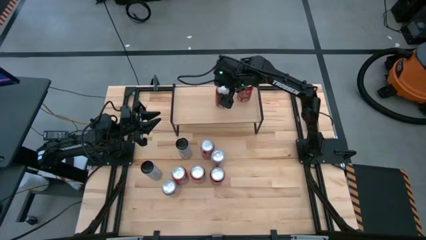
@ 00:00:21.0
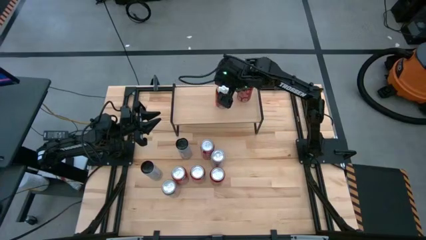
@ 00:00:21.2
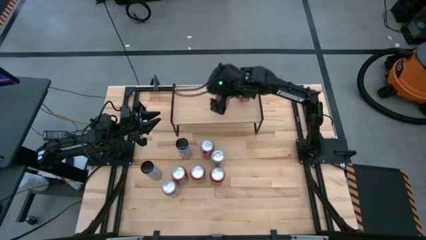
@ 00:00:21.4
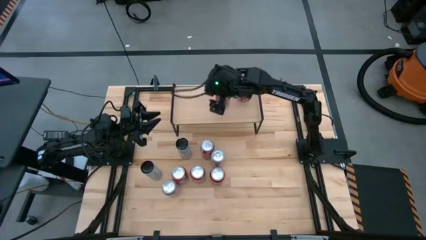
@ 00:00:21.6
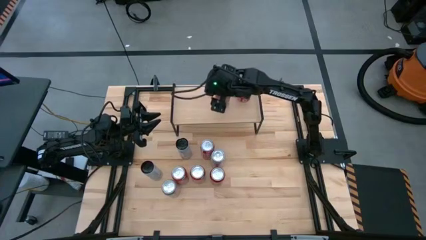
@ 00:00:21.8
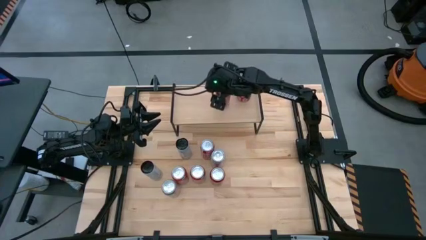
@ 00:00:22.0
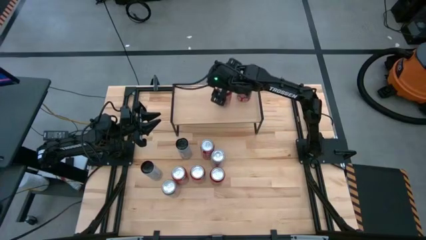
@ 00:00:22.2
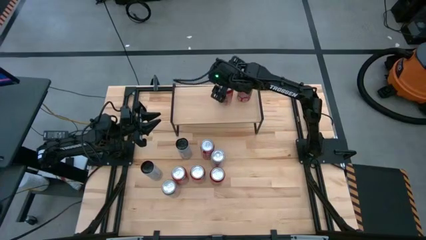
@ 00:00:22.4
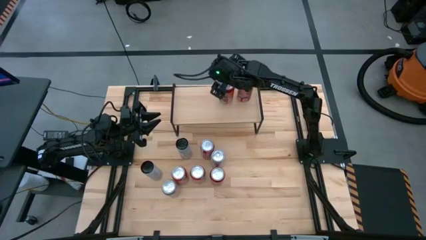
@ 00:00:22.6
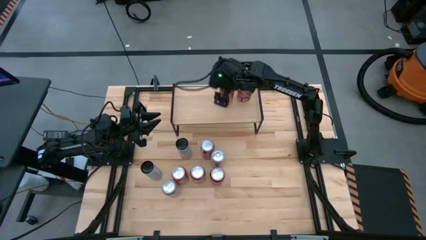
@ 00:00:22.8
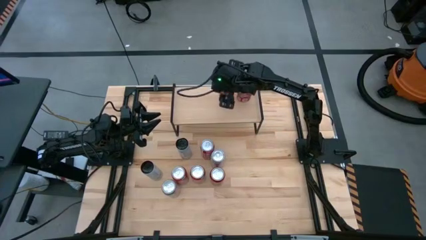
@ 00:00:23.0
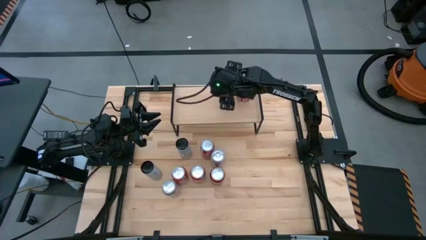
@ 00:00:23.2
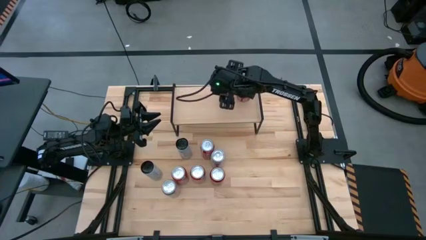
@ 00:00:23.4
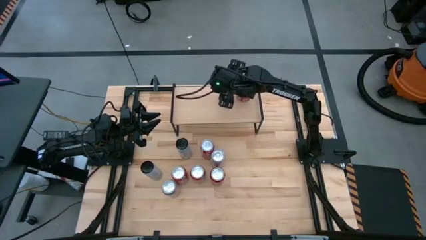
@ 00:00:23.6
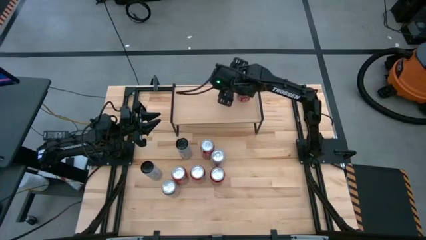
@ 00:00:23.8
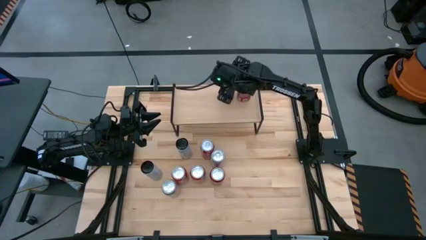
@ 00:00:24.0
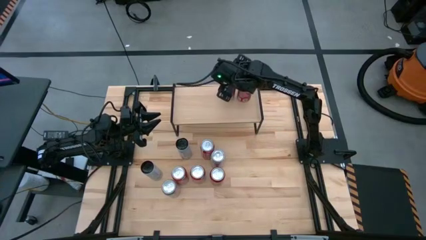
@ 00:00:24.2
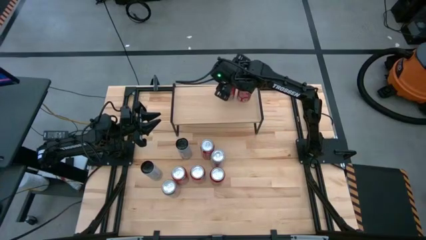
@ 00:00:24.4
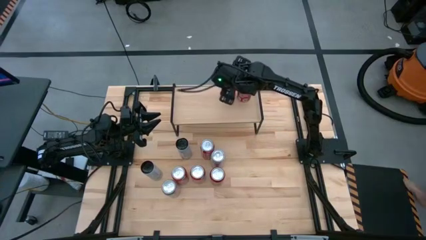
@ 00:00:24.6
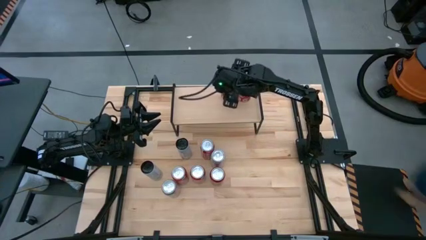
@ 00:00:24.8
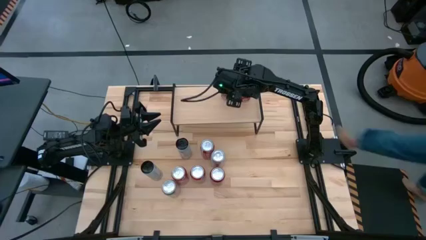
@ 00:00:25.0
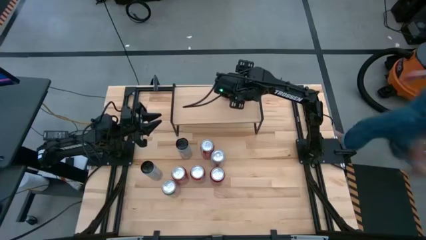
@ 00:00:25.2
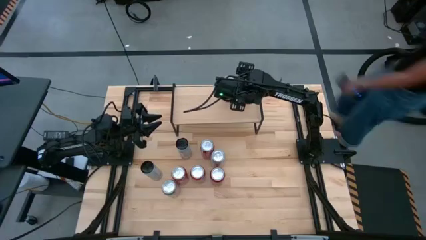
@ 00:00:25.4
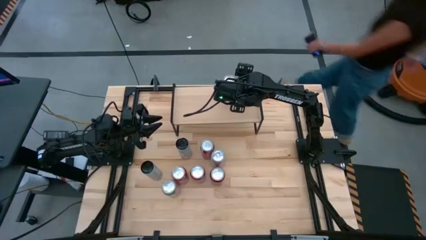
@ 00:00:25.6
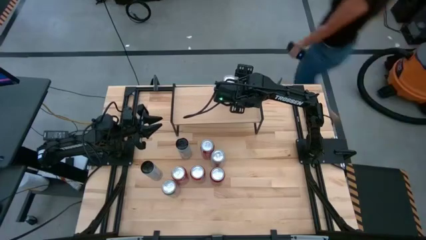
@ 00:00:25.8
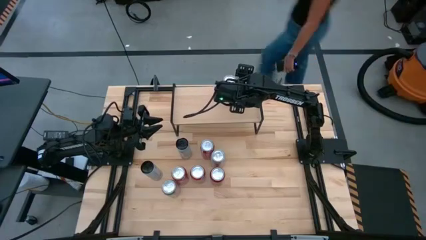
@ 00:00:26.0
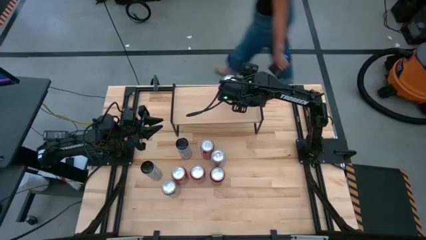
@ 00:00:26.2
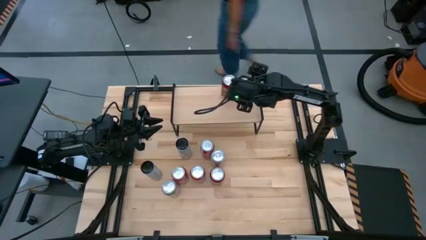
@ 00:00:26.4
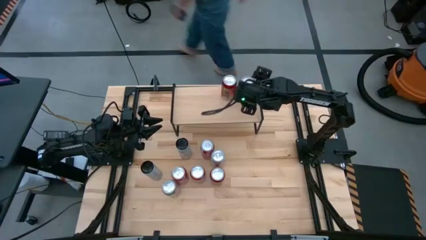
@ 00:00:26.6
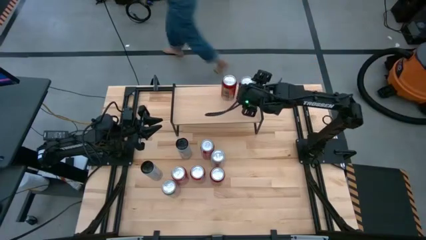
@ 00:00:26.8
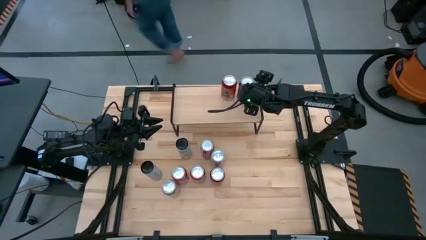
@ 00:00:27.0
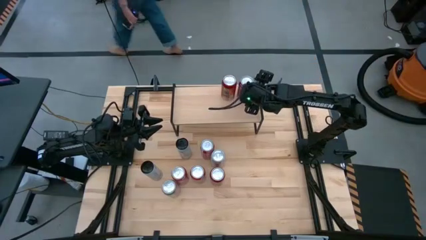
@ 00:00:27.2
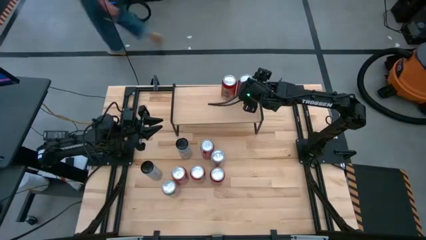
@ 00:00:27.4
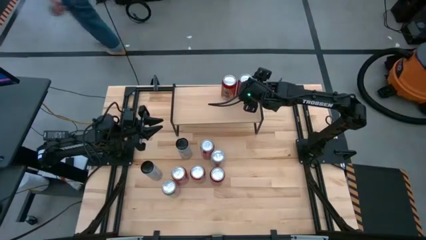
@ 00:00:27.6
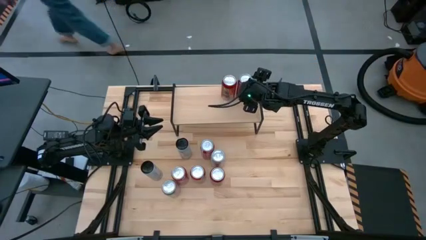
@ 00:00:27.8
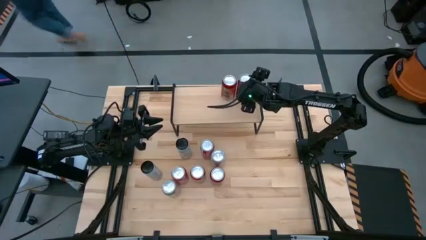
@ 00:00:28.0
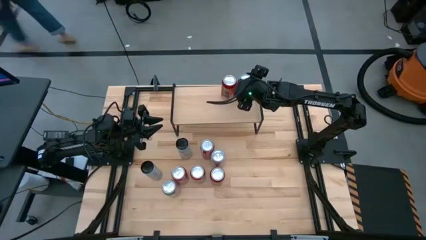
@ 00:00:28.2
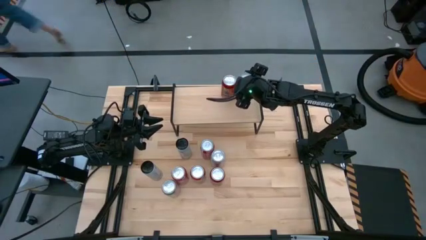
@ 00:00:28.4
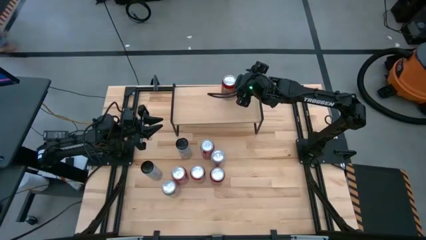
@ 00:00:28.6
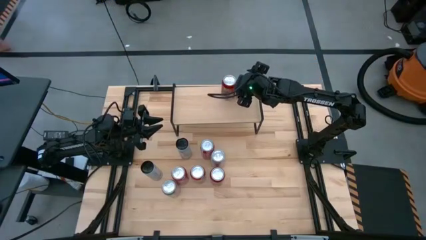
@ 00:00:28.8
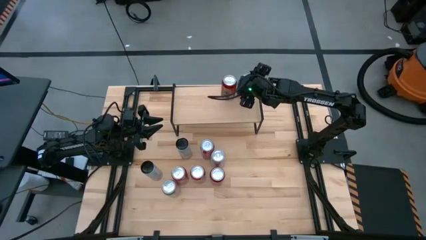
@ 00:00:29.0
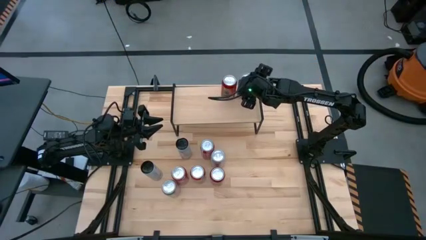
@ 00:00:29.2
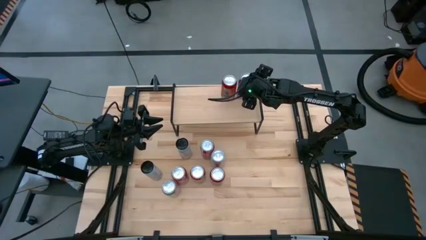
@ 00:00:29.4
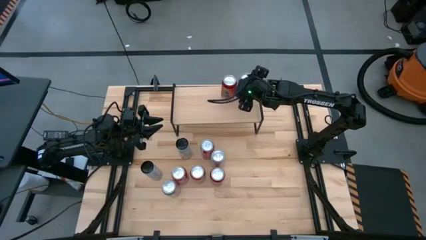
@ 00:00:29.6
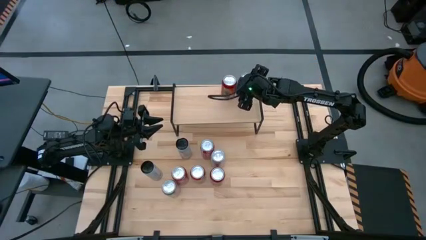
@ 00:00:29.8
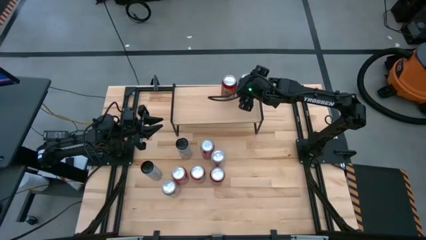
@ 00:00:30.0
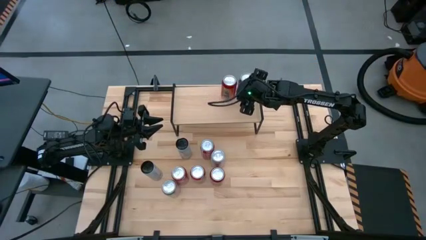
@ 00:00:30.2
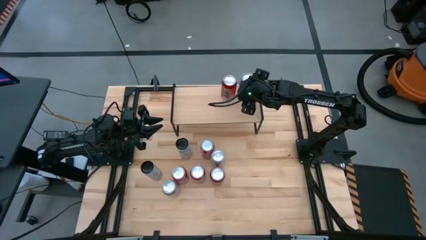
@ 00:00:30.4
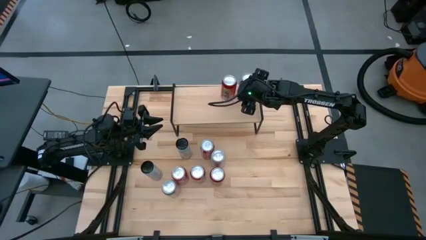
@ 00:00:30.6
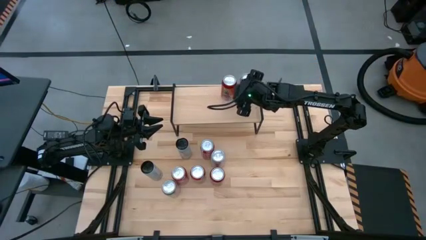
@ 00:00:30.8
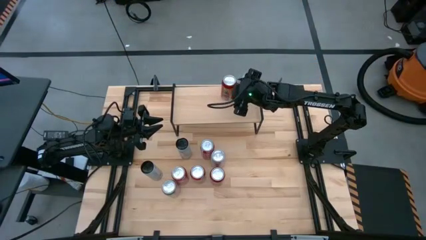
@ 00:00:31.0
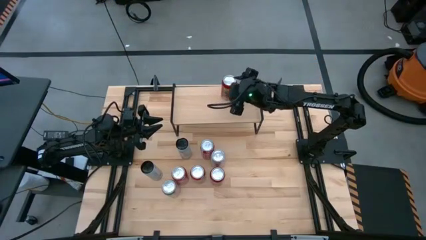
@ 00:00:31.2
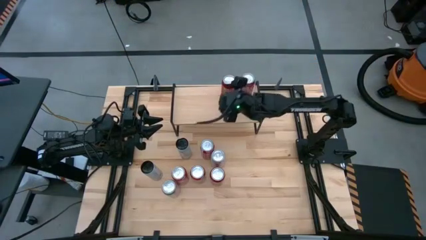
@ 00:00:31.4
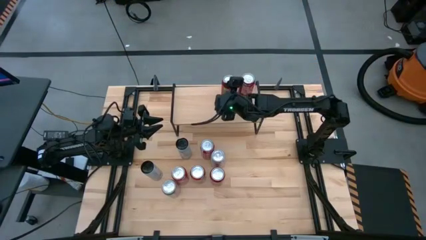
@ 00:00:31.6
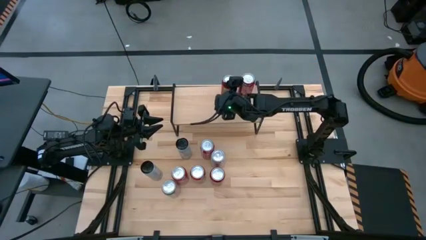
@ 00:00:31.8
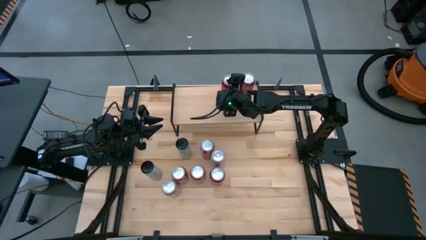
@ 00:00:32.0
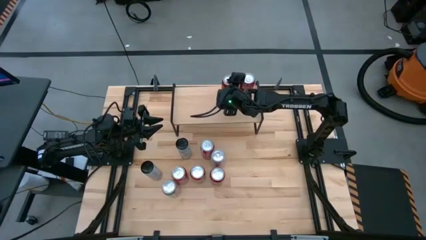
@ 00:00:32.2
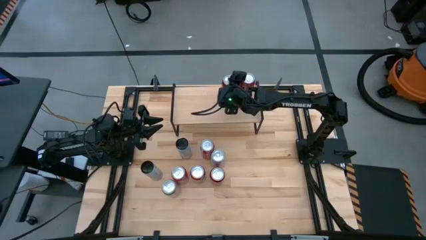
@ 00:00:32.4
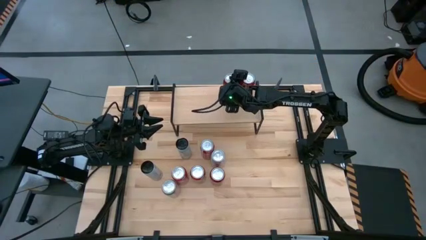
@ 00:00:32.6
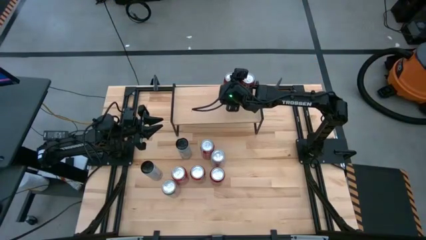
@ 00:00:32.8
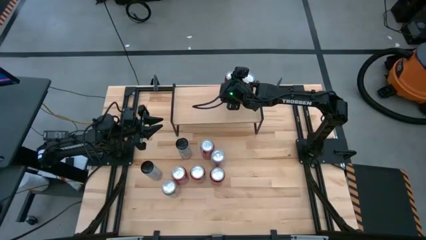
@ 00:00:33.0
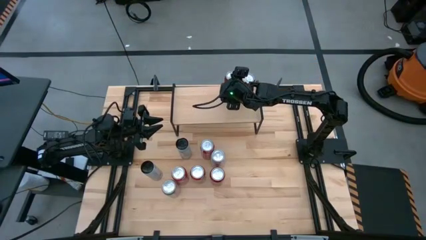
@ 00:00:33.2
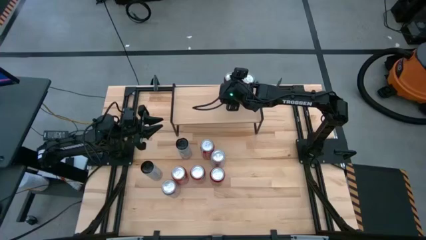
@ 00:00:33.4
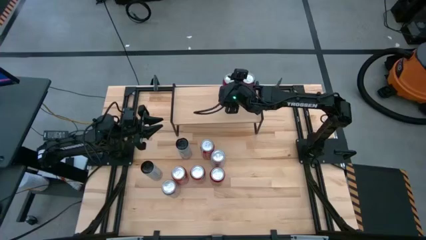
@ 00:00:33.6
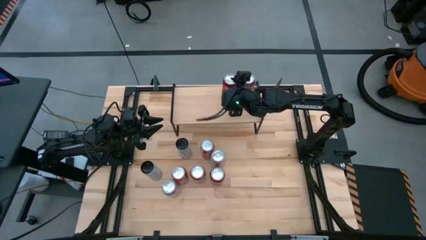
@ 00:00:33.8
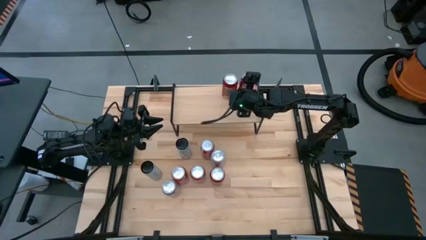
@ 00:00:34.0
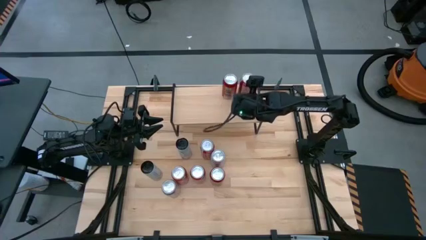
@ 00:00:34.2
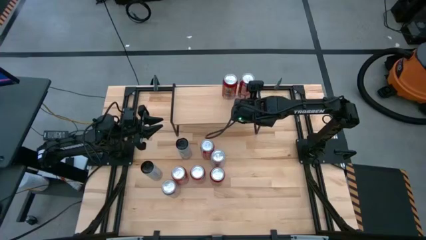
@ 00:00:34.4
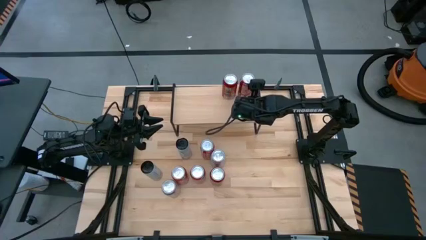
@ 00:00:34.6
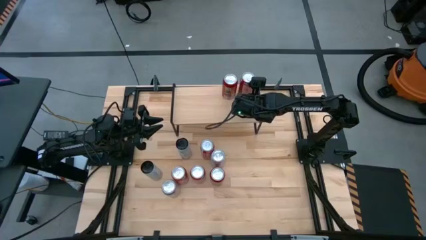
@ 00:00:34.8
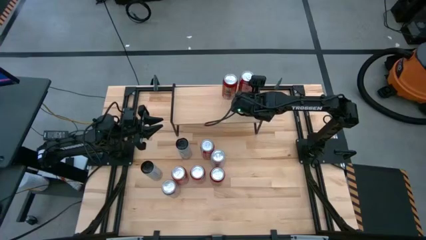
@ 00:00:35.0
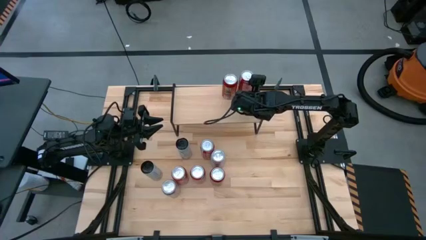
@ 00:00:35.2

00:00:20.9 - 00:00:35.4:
Task: Place canned beverage on shelf
Adjust the red soda cans

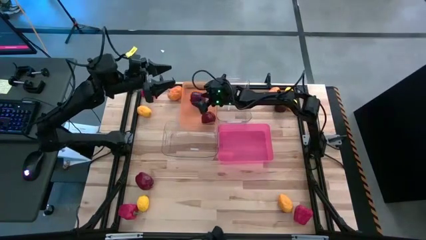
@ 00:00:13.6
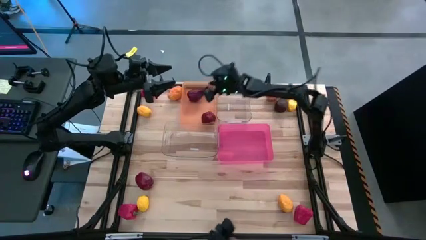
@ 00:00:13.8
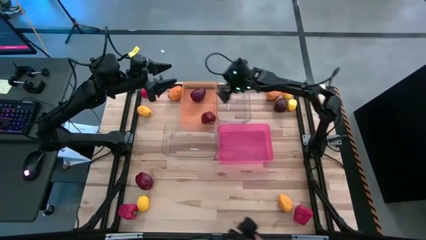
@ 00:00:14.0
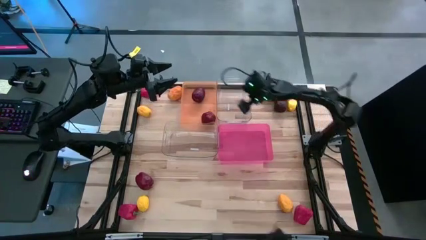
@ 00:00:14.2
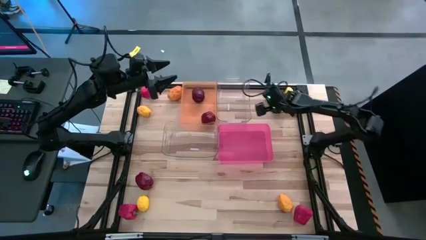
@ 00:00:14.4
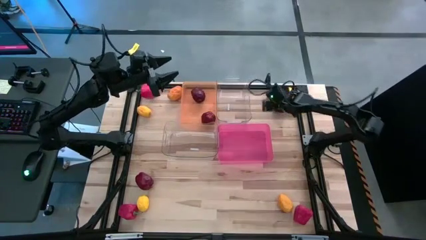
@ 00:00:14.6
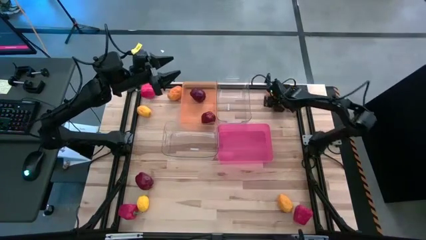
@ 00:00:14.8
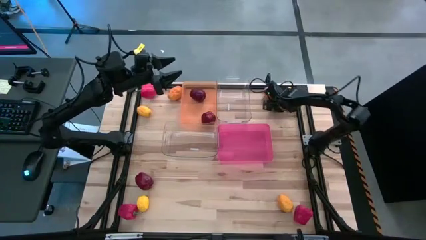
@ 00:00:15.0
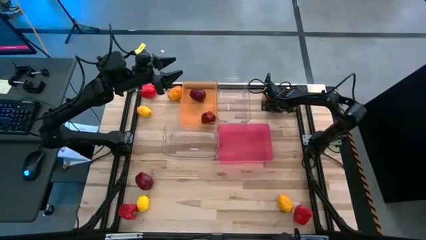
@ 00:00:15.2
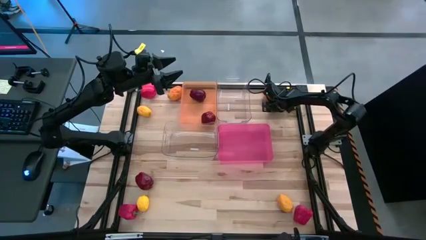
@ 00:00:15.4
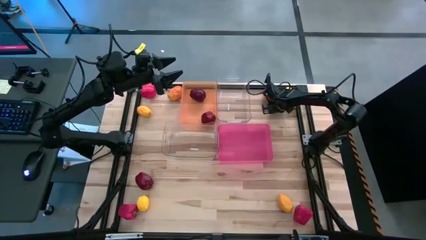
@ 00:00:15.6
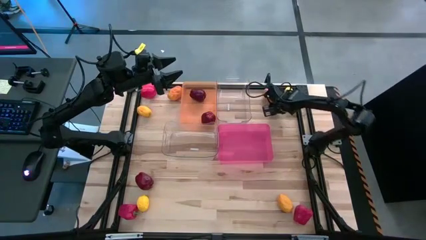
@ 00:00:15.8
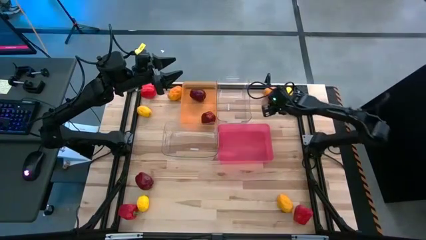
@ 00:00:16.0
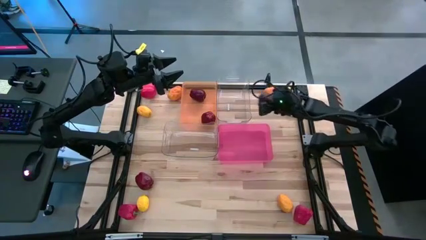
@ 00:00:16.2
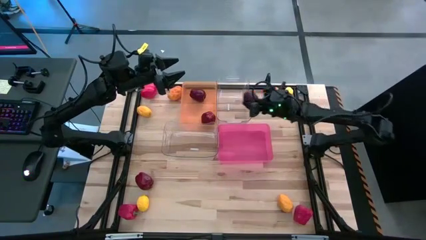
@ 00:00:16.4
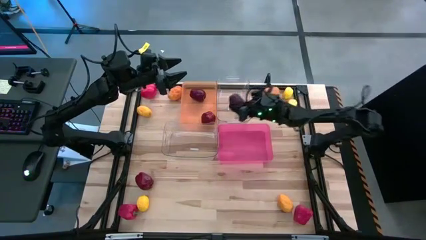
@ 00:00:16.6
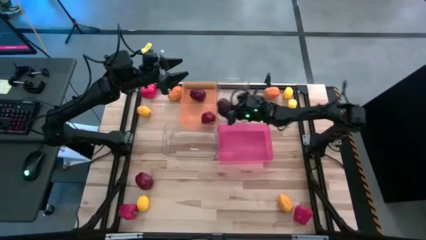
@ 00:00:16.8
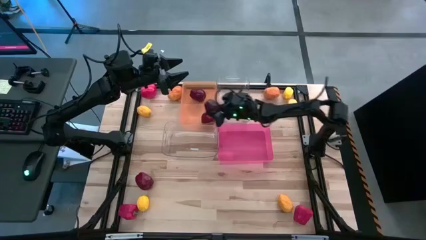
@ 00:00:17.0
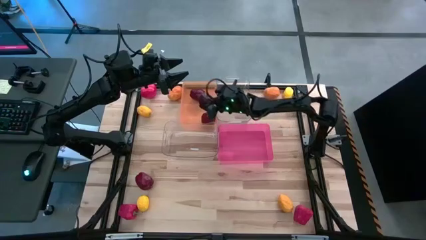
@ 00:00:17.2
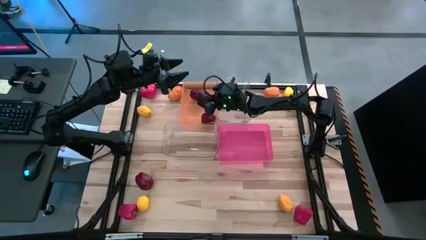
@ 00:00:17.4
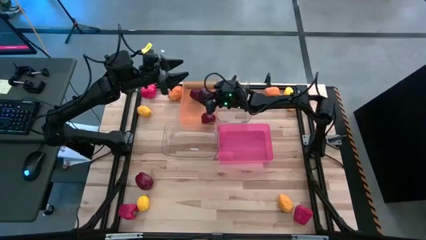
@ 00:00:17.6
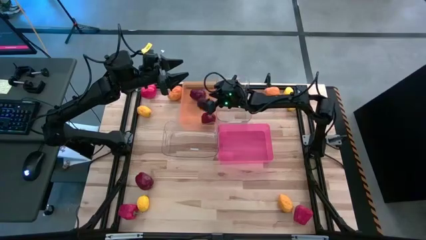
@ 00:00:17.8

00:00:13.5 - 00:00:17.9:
Task: Sort produce into baskets
Put the red apple into the orange bin
